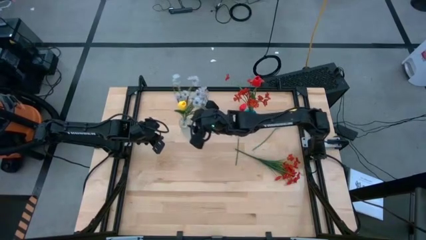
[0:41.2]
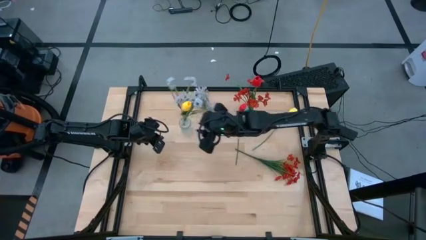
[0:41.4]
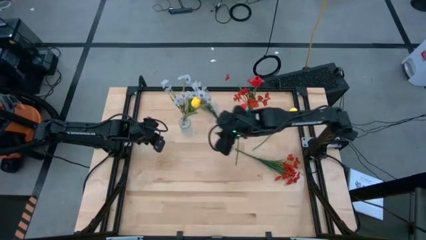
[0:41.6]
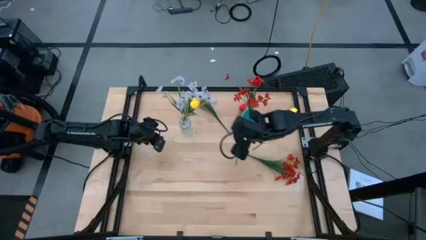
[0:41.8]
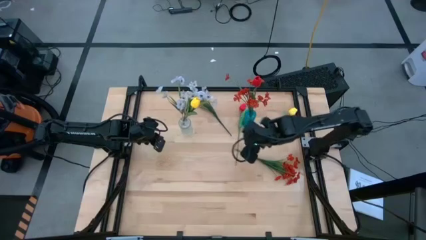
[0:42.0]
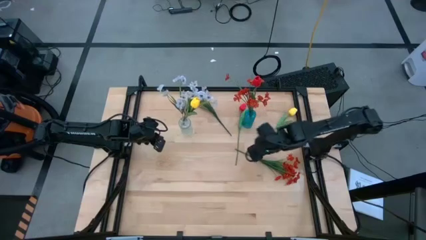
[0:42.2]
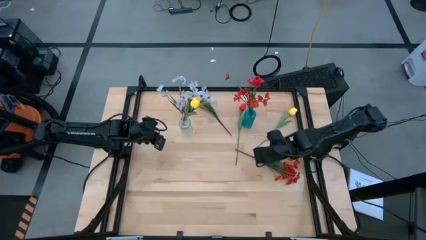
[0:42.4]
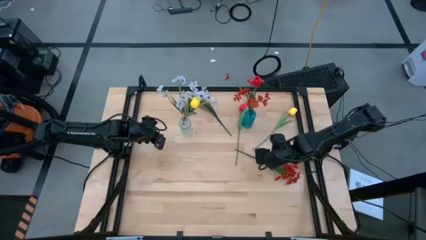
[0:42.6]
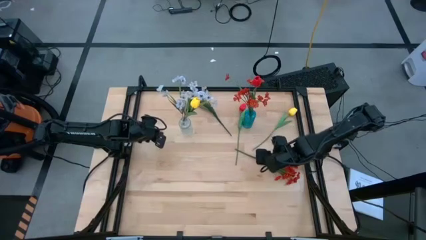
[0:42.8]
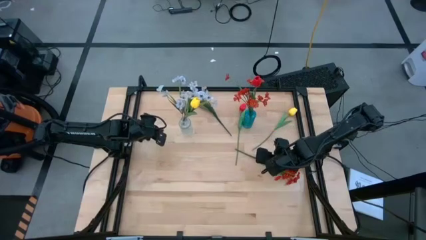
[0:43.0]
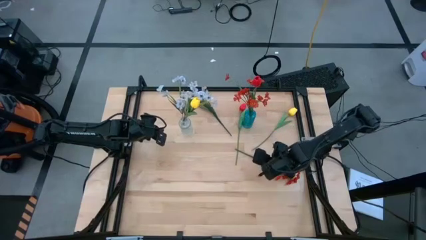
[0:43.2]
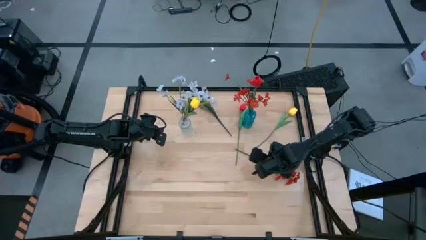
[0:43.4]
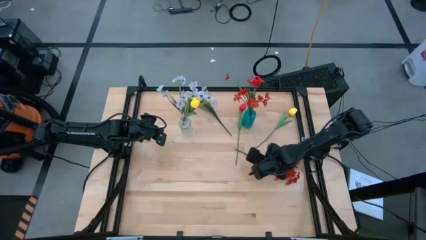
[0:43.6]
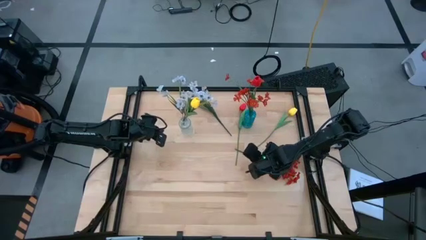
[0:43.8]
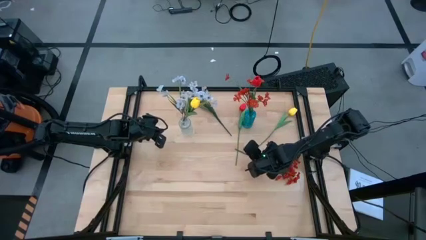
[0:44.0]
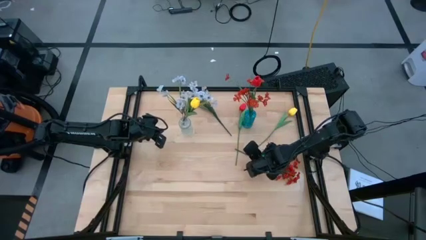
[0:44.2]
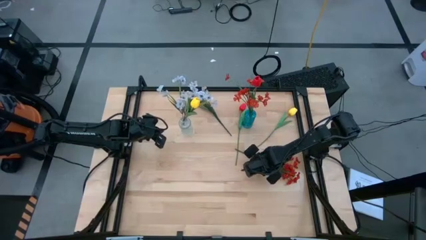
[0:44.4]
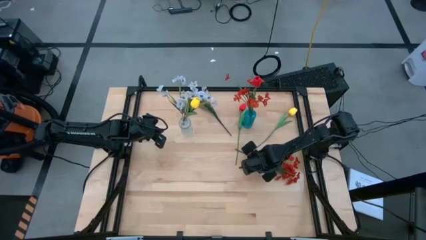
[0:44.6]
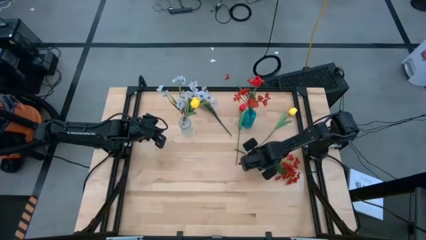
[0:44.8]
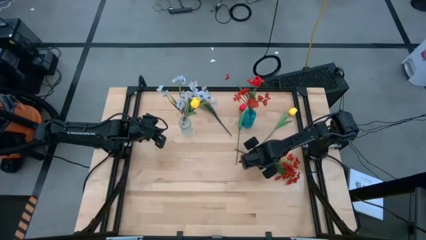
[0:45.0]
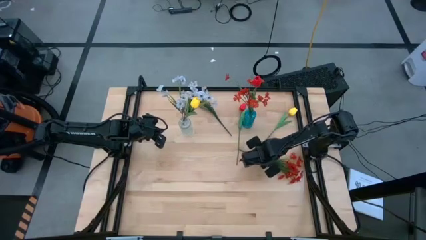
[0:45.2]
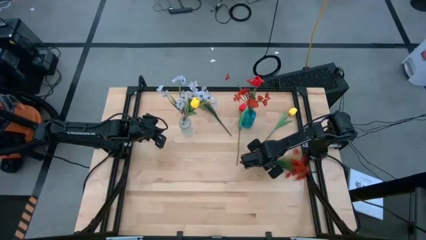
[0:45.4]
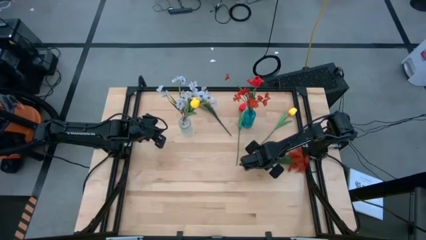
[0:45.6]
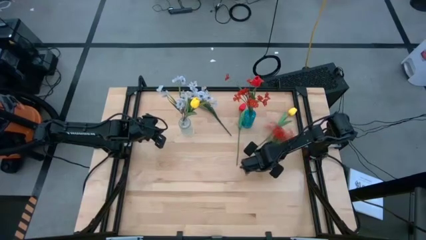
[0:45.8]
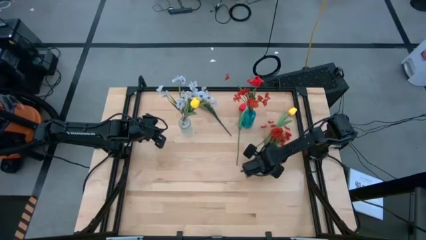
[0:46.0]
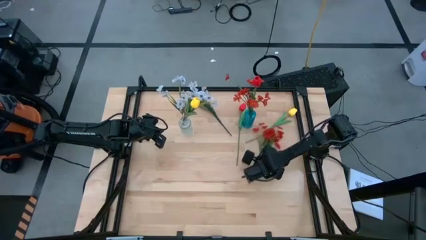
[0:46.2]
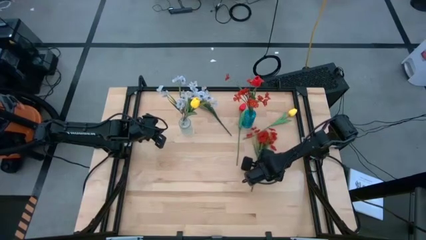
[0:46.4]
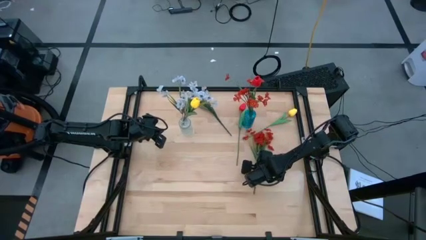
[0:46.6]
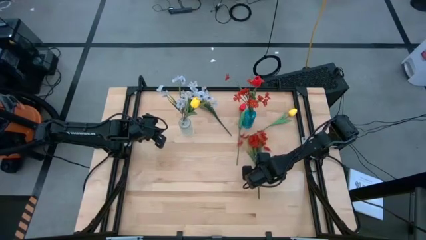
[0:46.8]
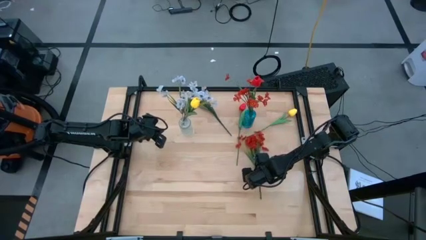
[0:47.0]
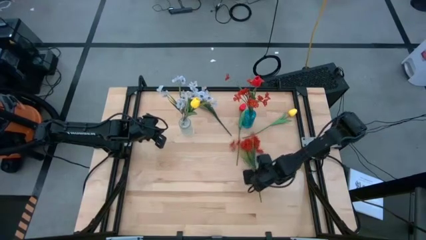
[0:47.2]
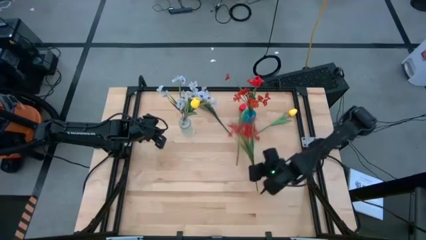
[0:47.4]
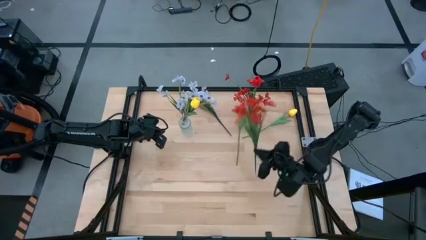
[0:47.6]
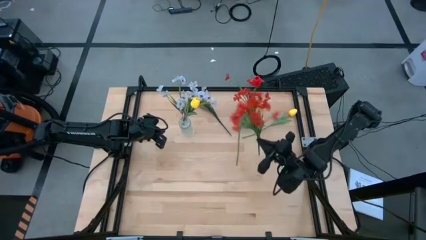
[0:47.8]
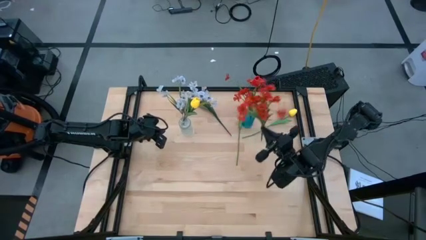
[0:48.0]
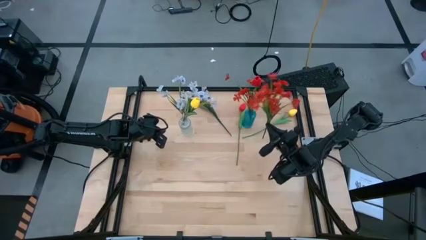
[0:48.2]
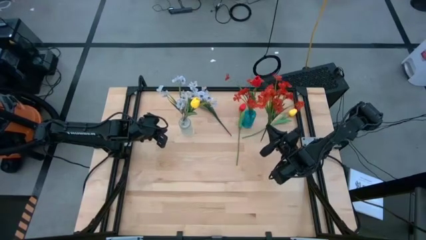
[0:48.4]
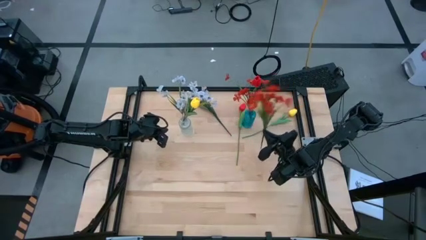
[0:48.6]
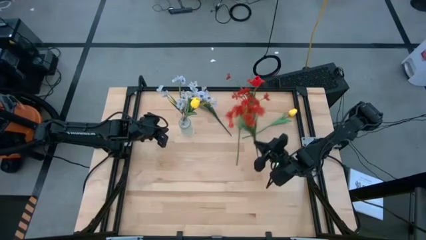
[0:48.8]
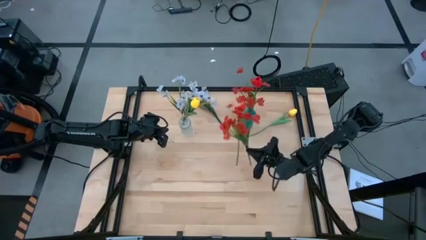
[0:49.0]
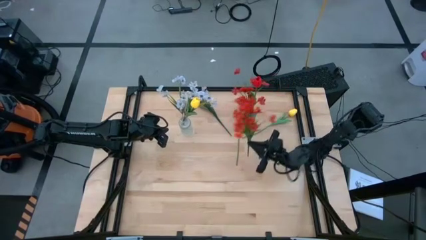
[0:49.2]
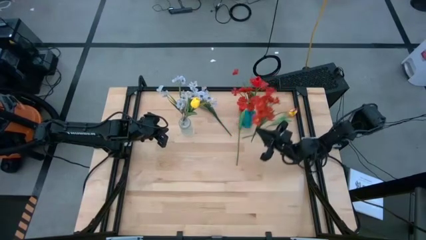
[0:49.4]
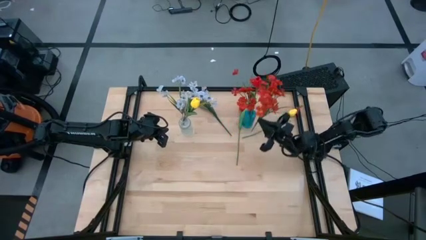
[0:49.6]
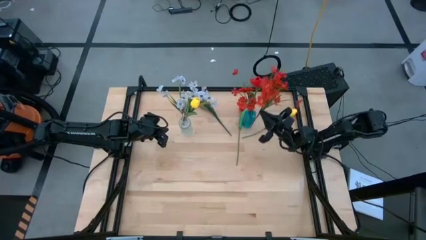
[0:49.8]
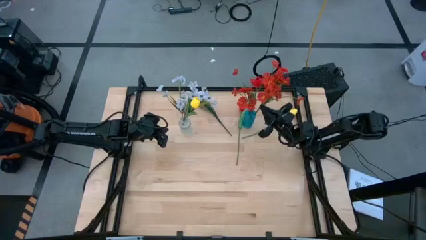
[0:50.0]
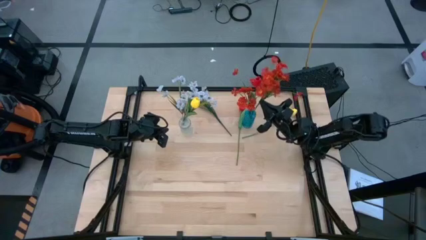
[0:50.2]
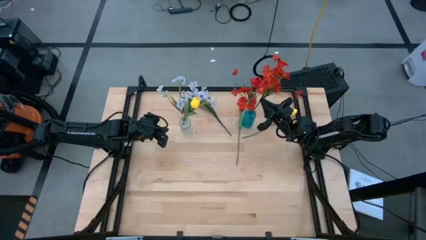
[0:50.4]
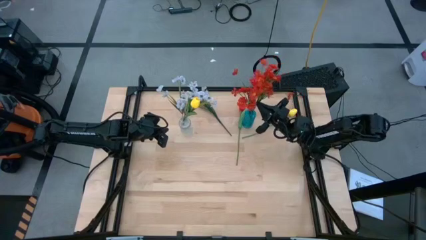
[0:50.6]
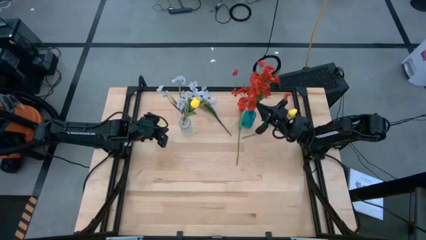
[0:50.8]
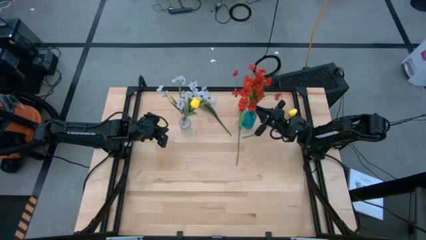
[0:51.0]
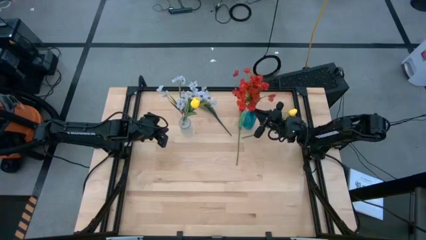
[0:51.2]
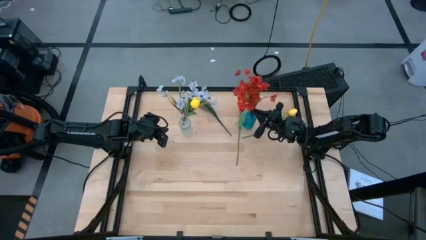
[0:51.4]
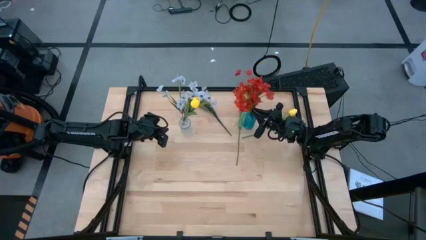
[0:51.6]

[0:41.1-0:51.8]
Task: Sort flowers into vase by color
Put the red flowers into the blue crystal vase

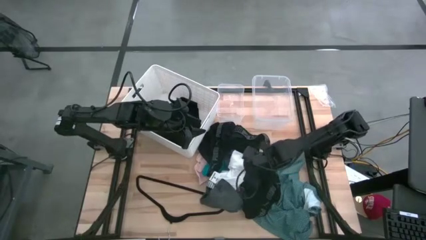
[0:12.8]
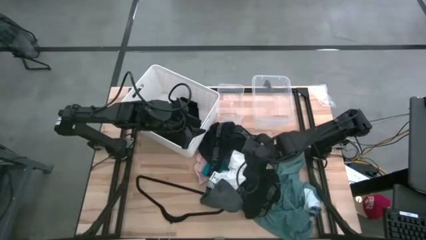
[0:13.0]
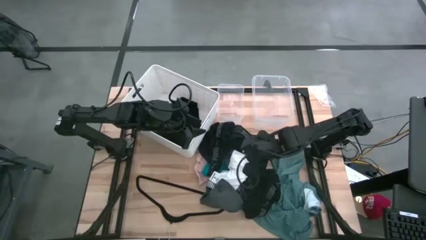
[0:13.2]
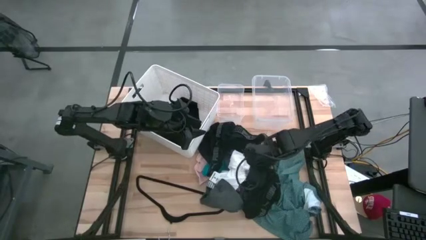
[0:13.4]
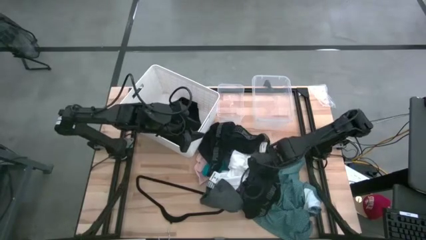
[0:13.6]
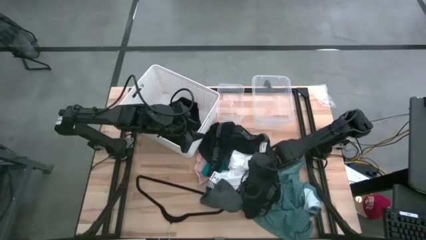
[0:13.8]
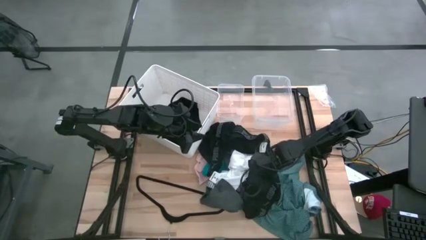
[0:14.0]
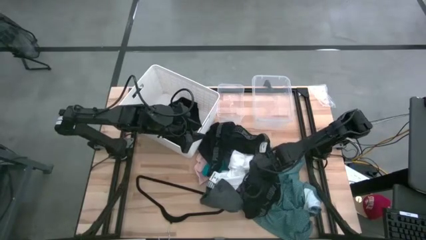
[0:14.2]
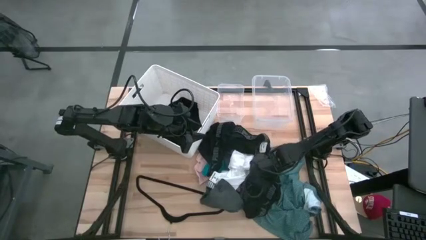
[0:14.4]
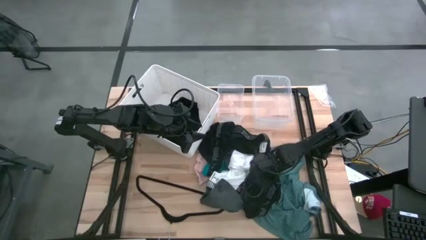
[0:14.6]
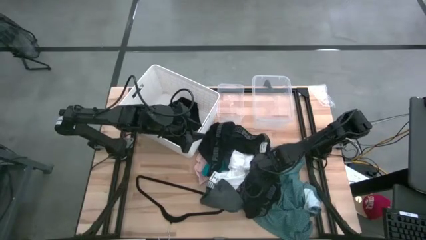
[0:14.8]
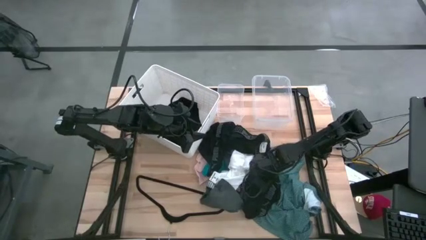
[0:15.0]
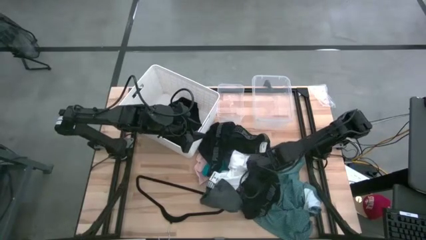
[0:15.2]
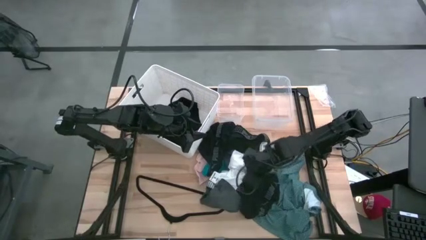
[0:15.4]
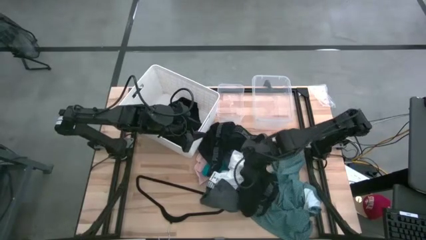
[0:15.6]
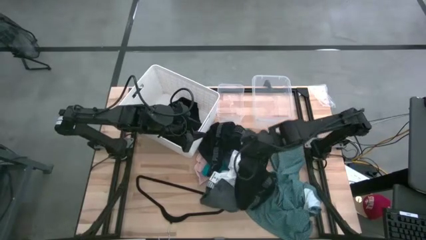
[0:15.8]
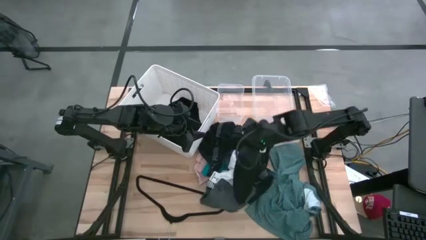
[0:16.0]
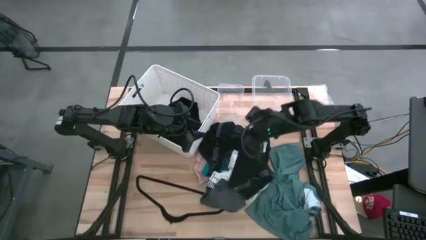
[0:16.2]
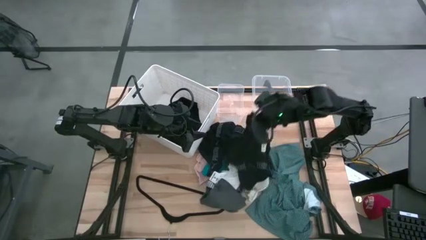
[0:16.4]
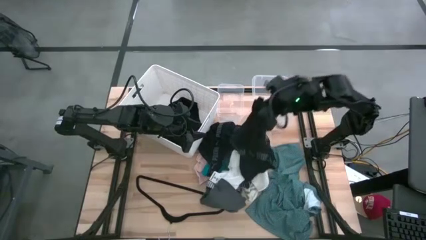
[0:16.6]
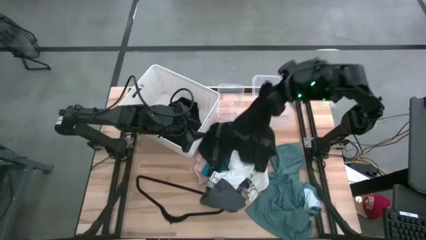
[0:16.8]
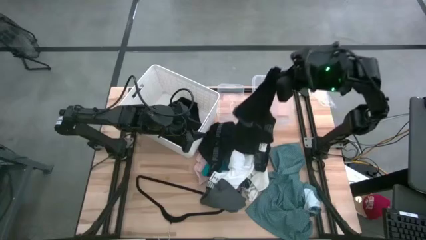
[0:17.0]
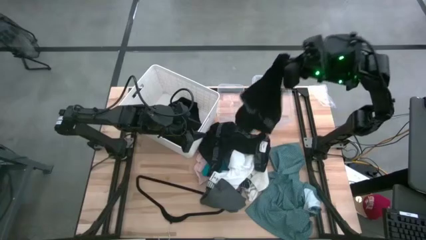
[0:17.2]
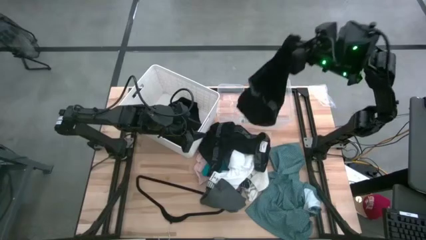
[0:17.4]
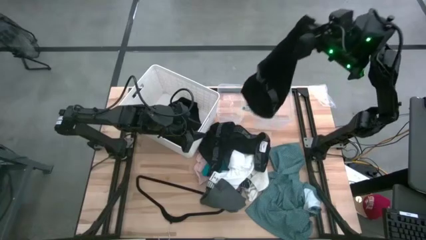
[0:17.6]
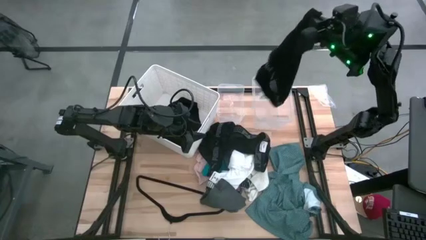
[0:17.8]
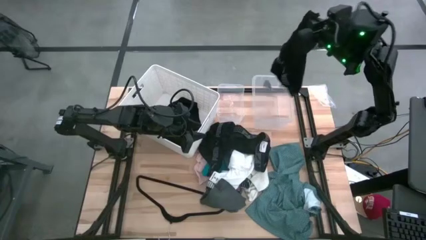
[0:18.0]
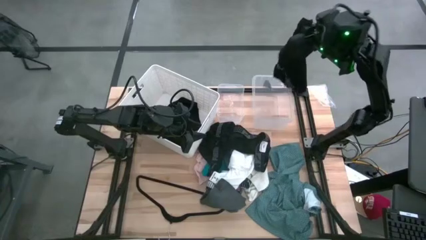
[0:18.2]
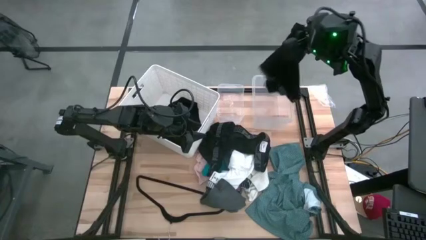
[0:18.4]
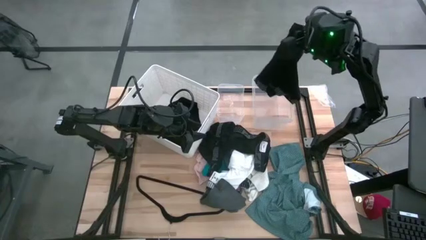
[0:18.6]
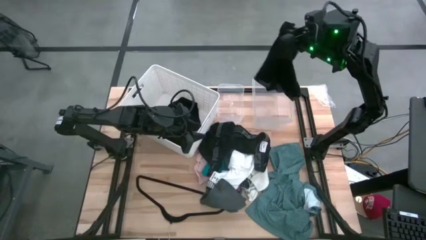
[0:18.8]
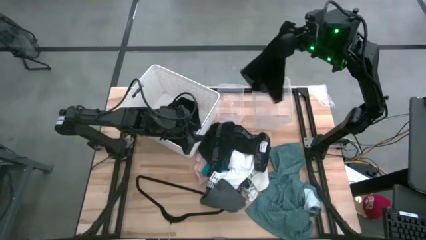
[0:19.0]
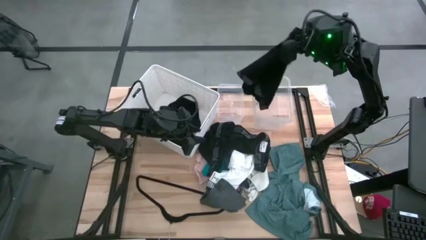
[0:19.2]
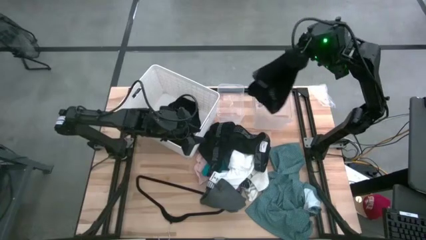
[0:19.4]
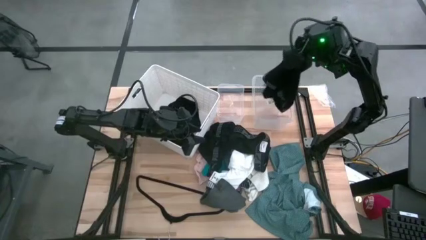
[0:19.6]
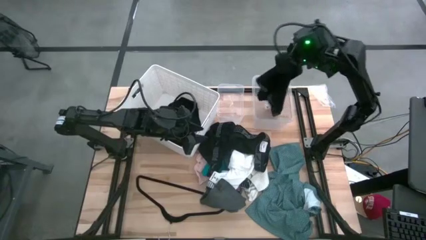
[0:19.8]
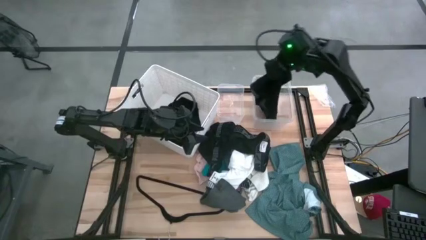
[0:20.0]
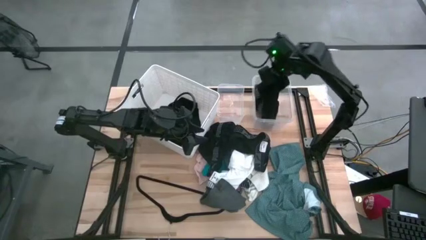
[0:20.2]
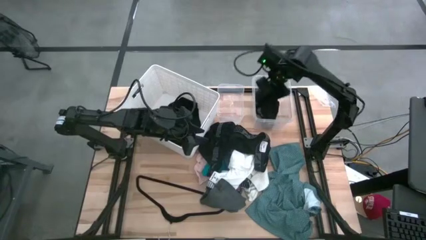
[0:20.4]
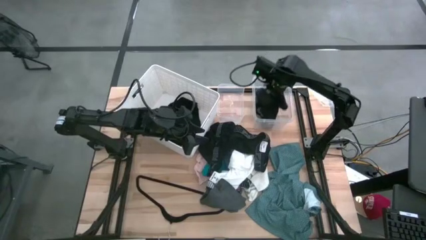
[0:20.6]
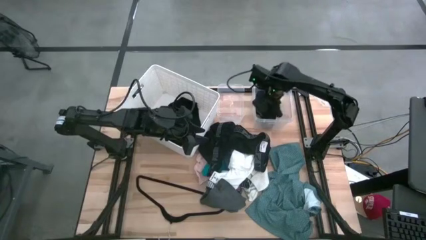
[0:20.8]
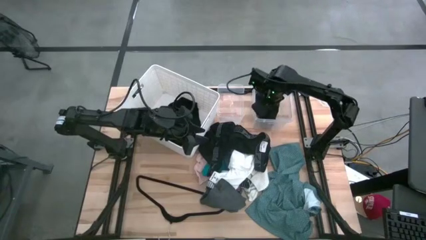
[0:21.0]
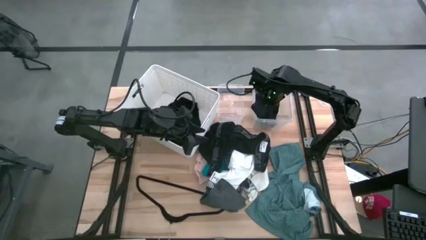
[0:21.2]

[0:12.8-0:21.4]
Task: Pick & Place Cloths
Put the black underwear into the right transparent bin
